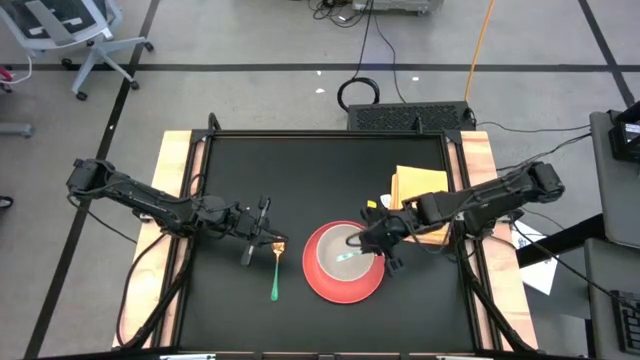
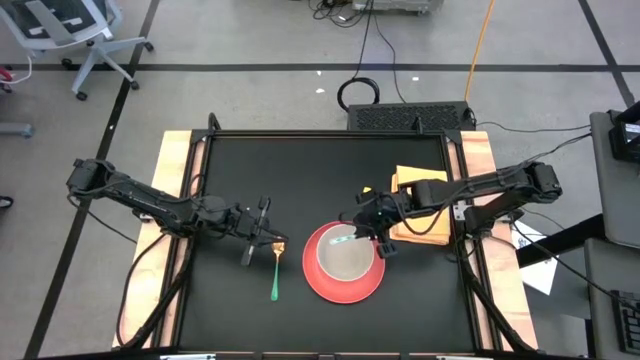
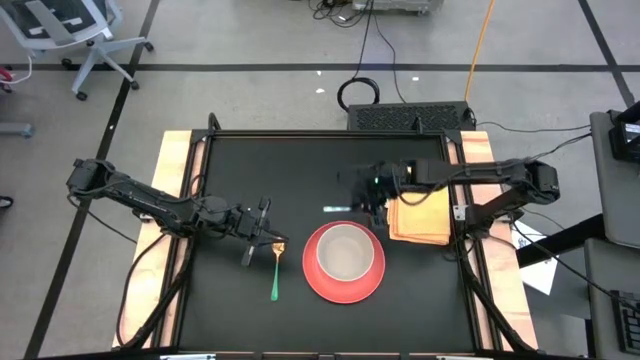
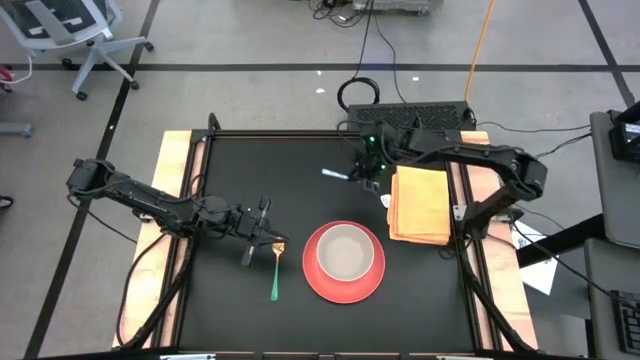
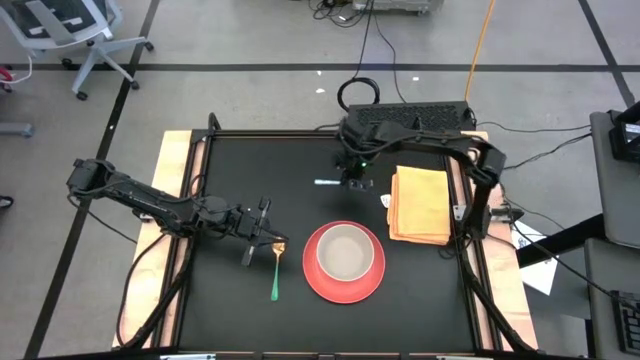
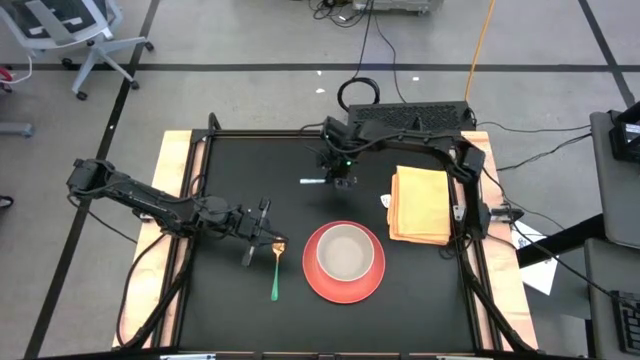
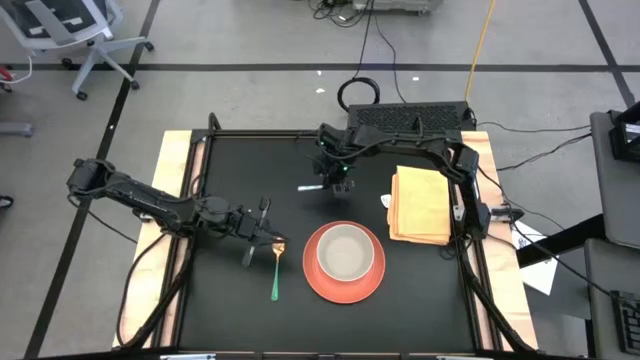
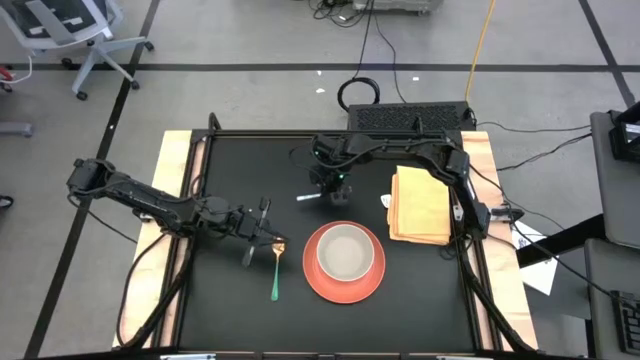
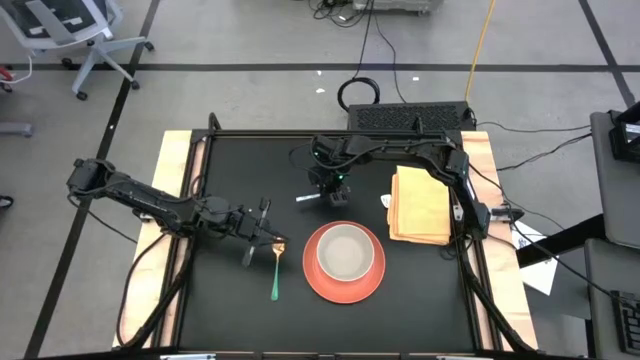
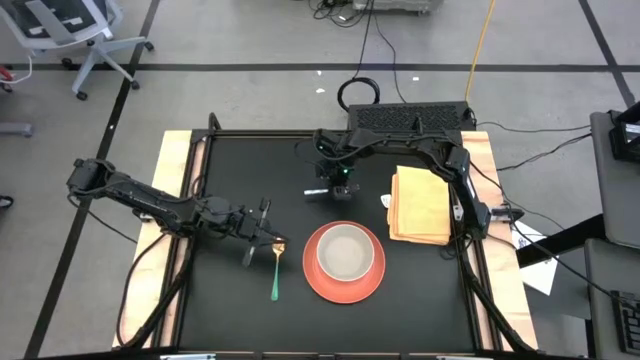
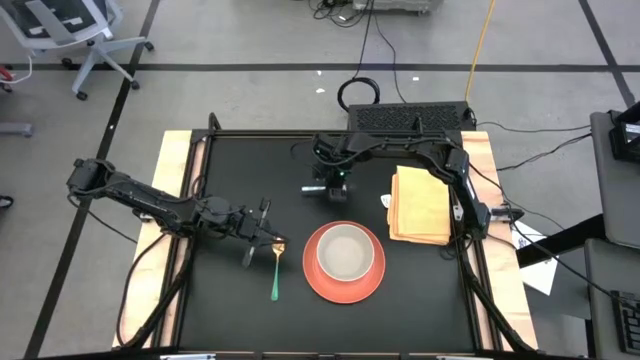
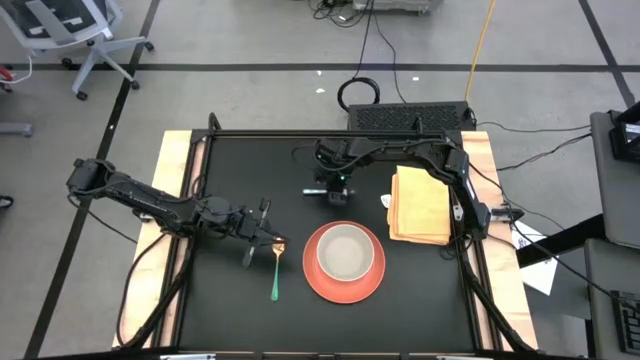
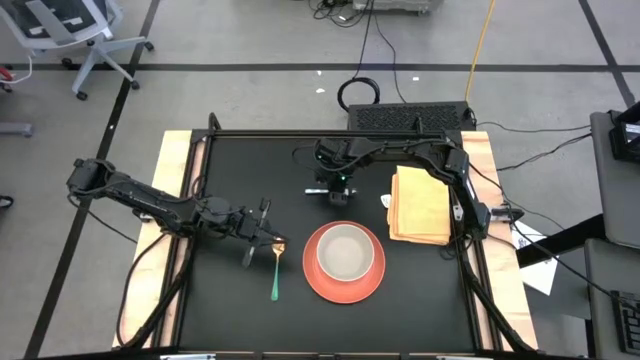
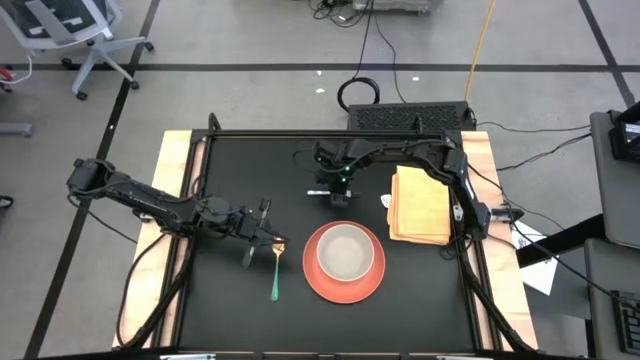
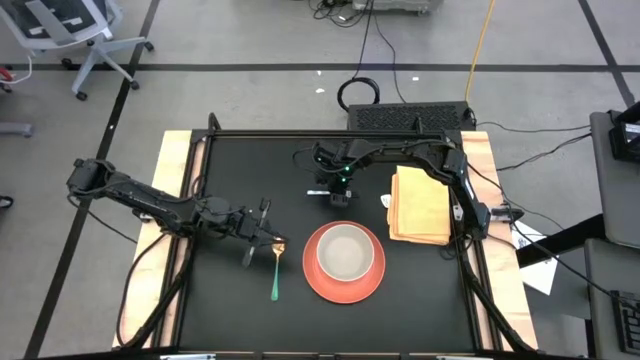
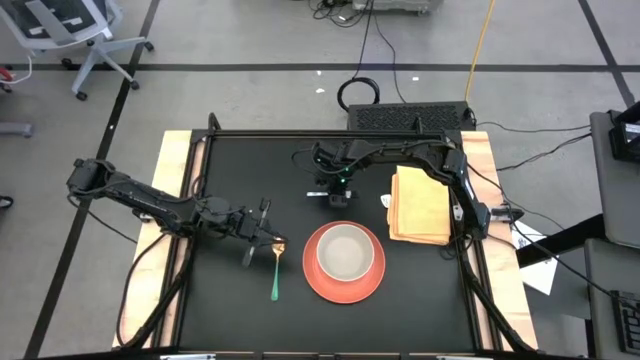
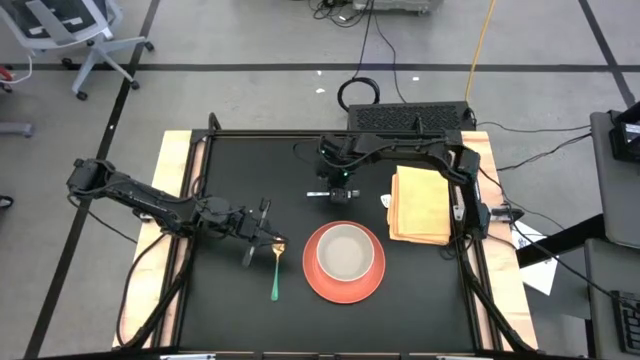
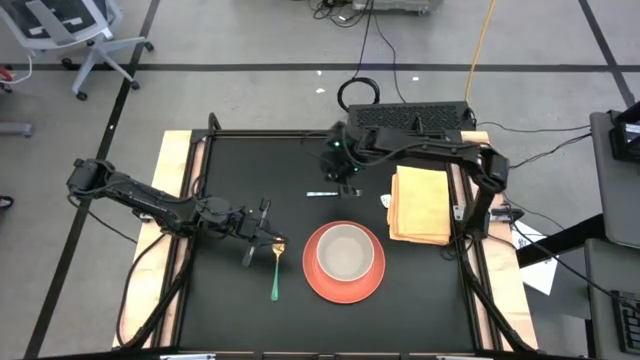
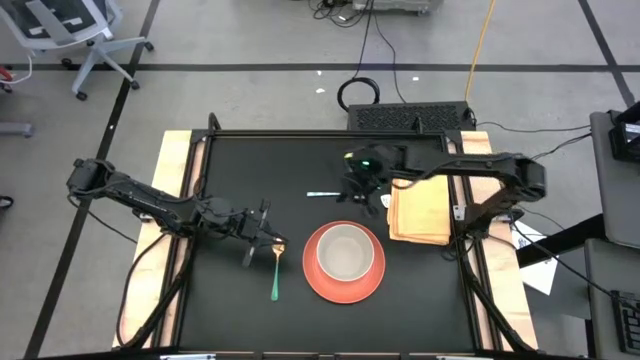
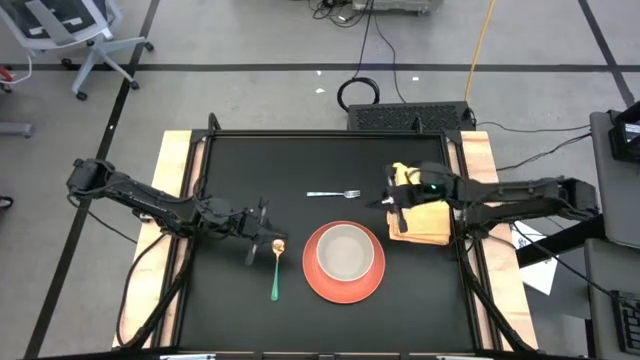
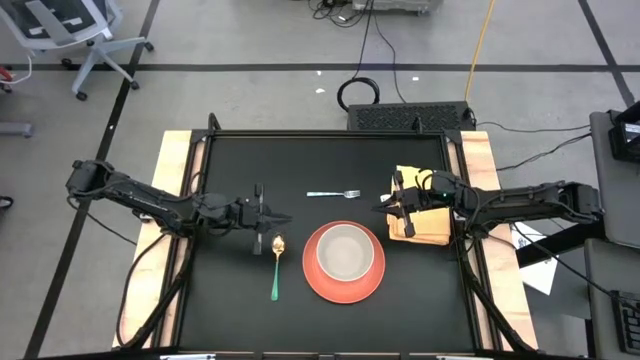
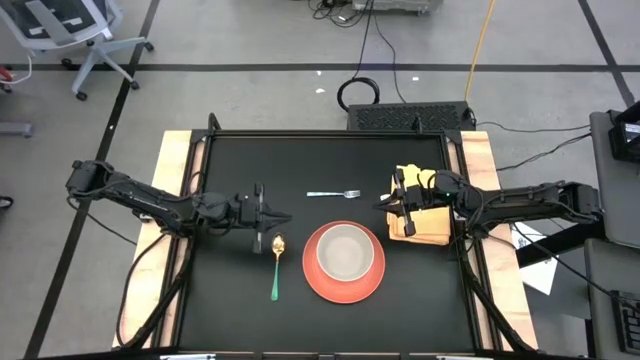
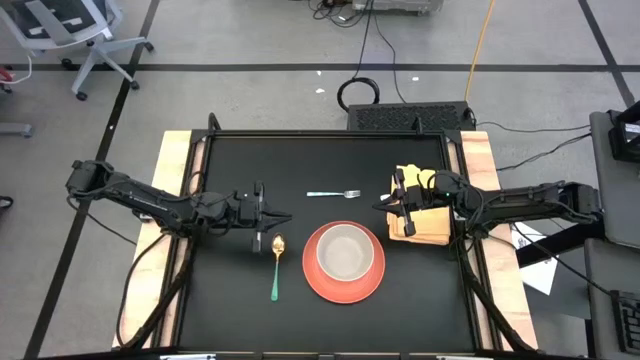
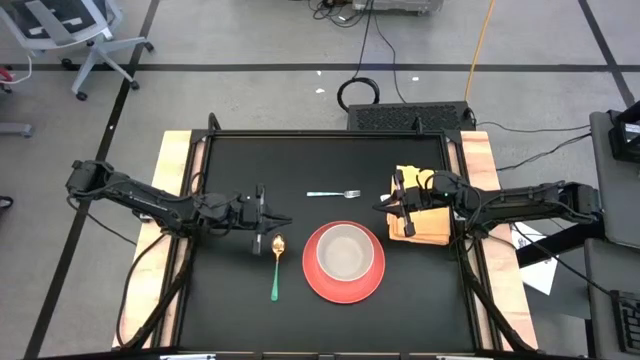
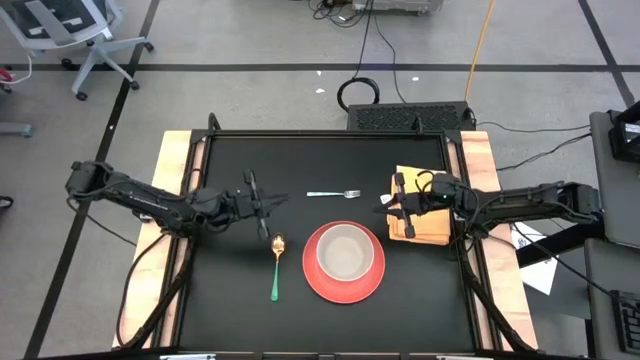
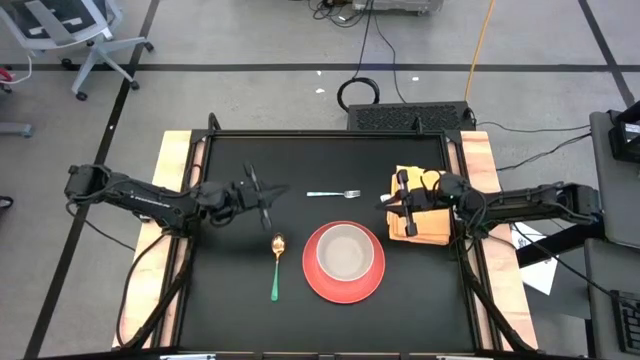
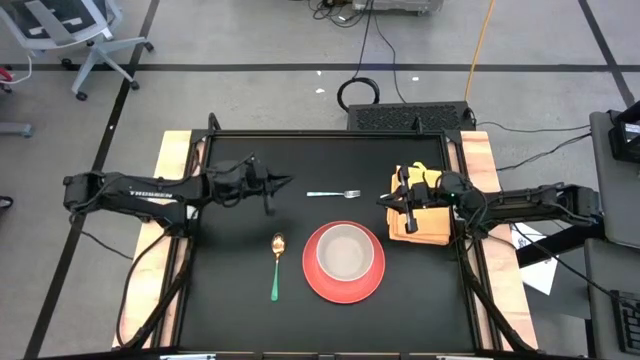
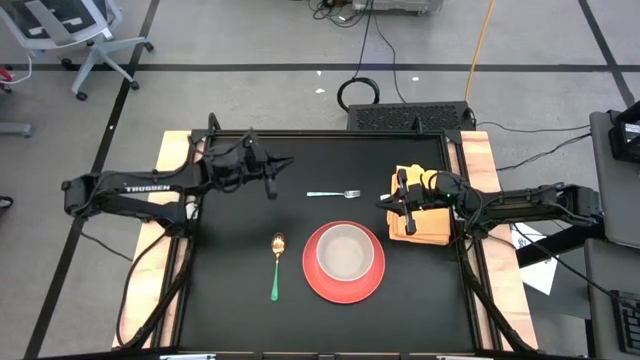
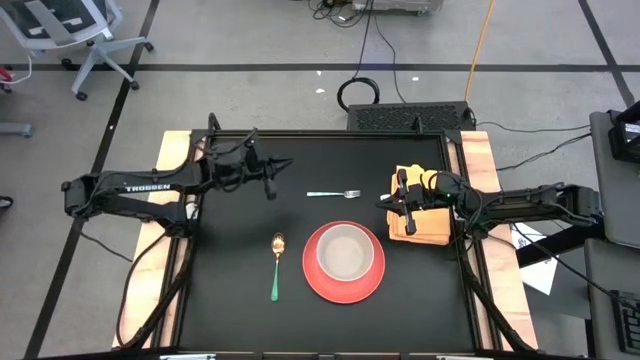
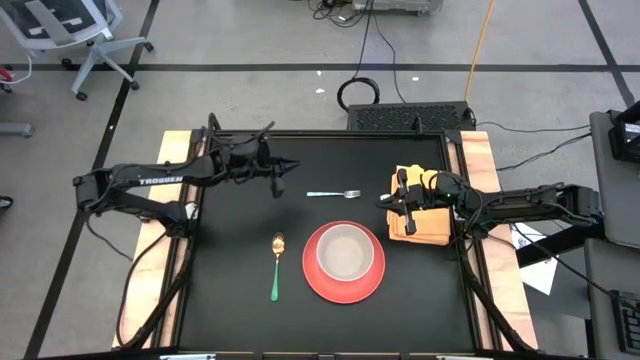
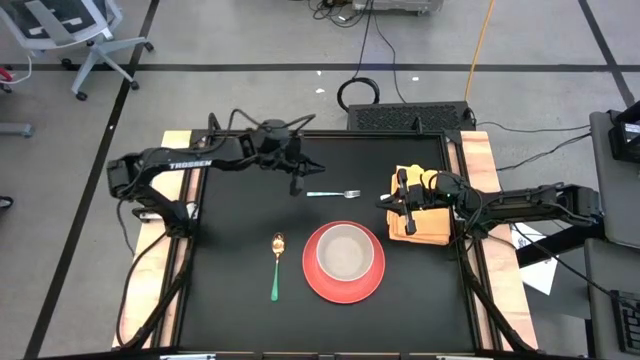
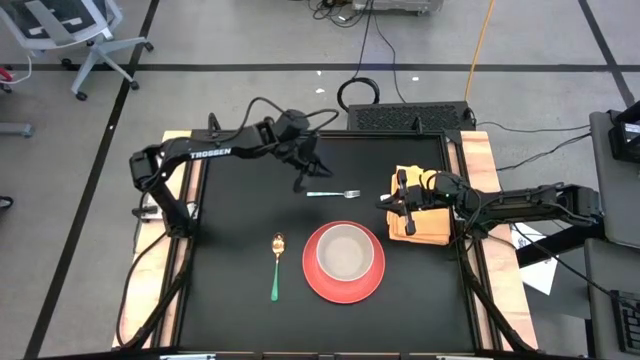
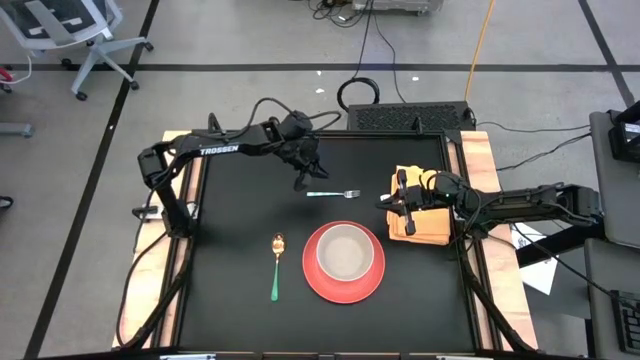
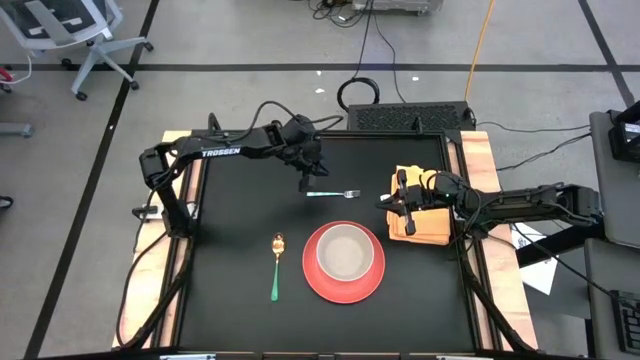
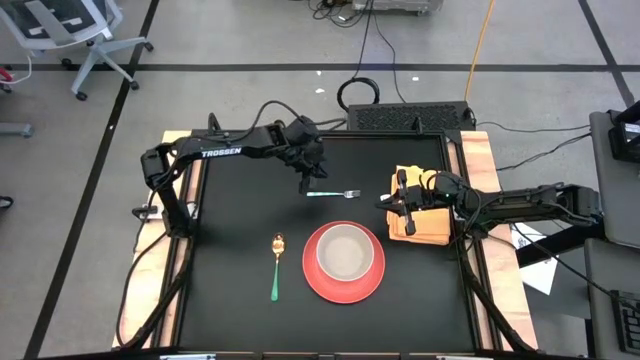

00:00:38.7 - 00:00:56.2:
Task: Set table place
Put the green patterned fork on the orange plate to the left of the white bowl

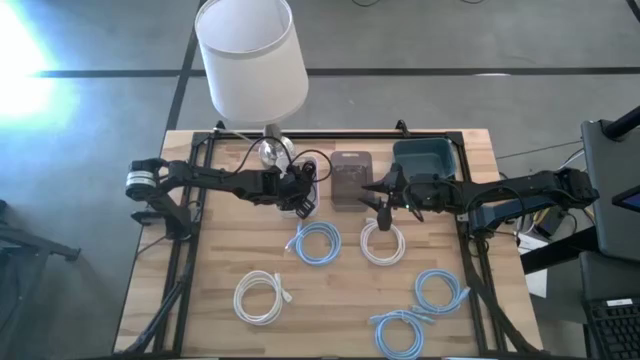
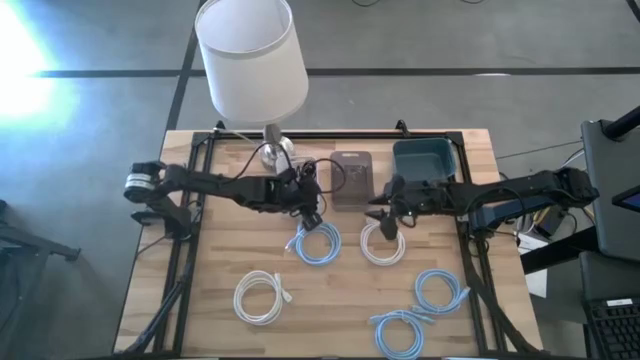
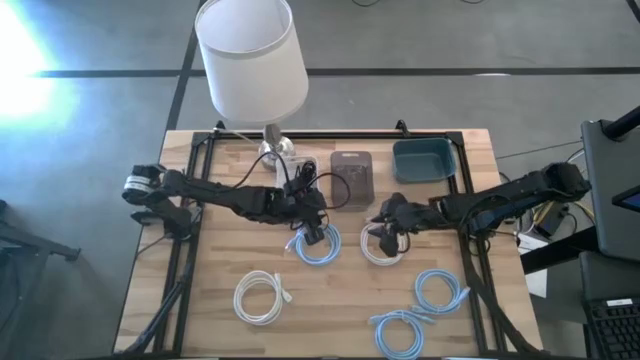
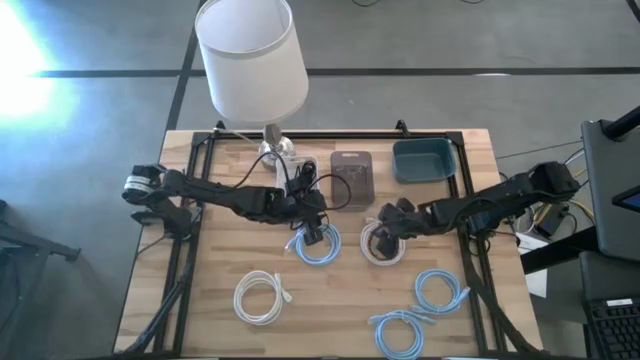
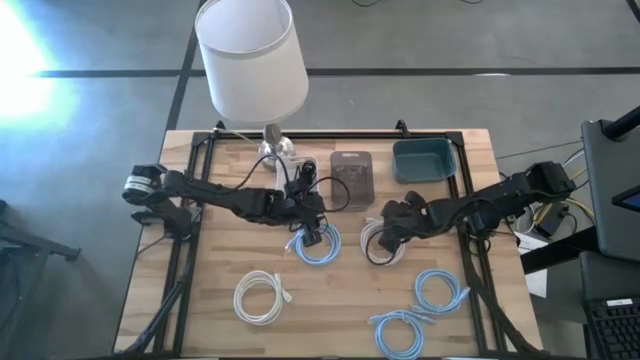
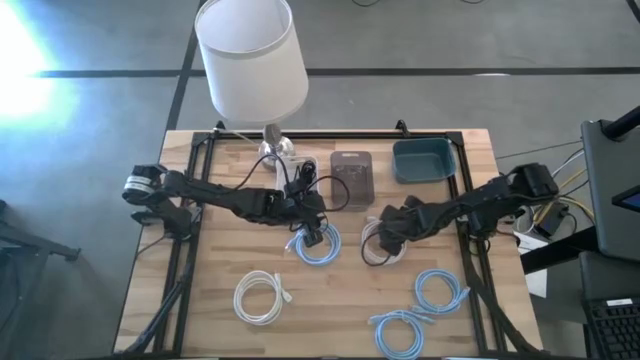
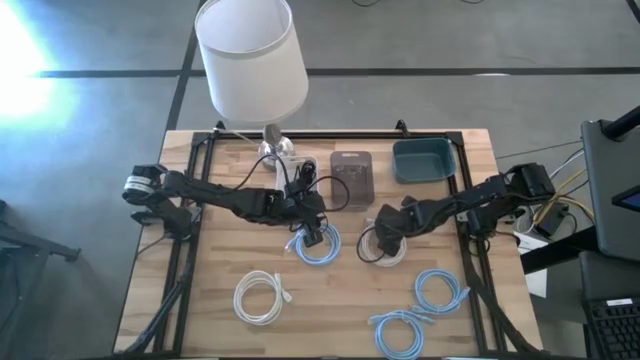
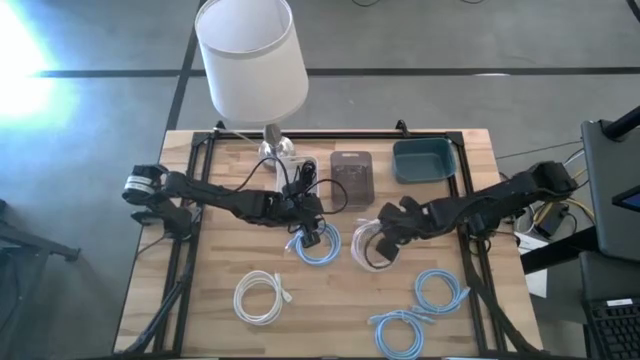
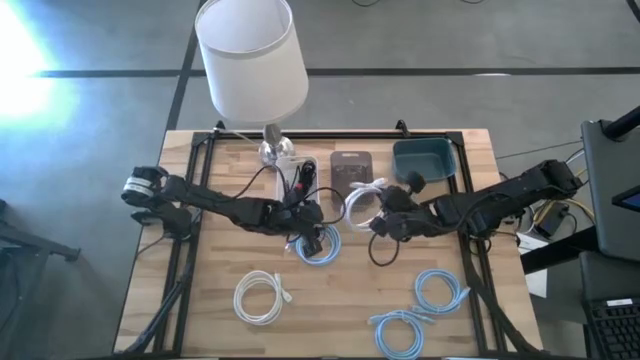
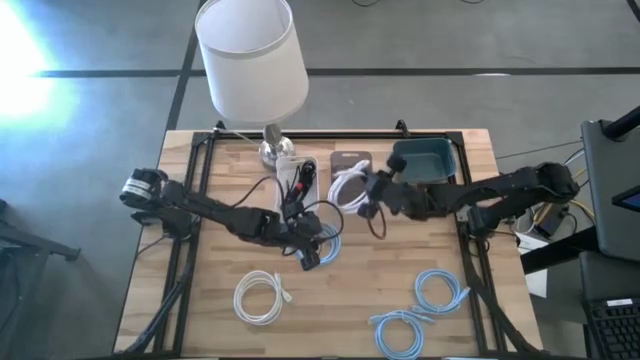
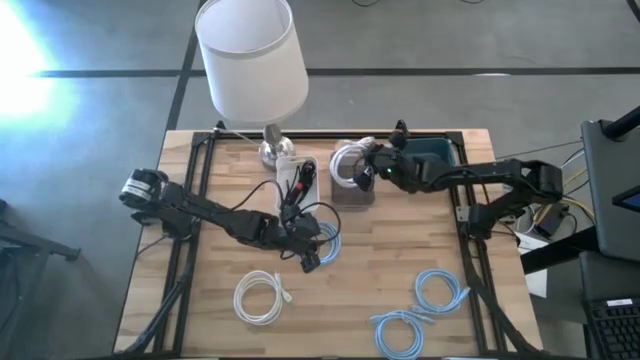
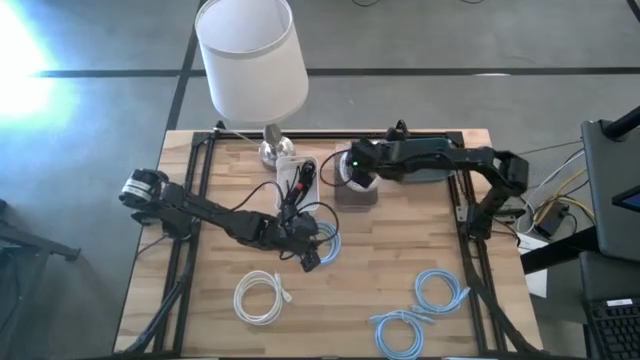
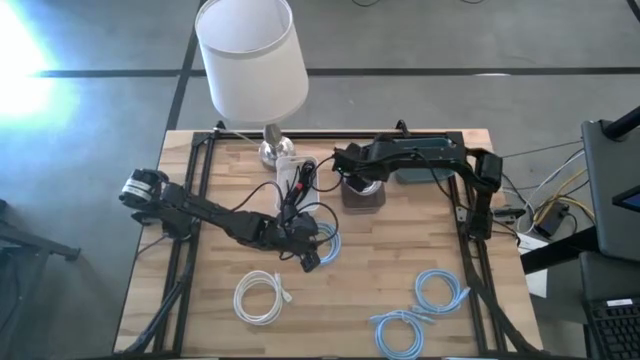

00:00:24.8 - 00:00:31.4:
Task: Pick & Place USB Port
Put the right white HDMI cable into the black bin
